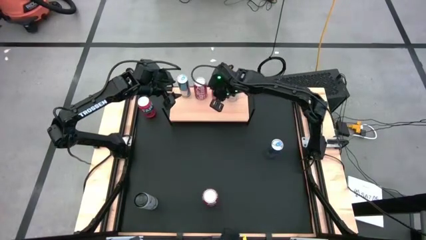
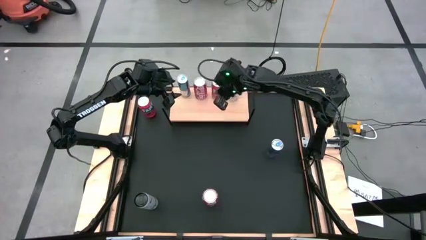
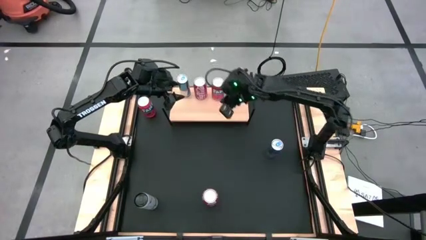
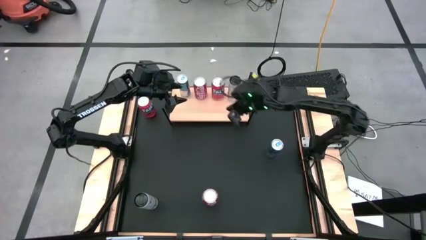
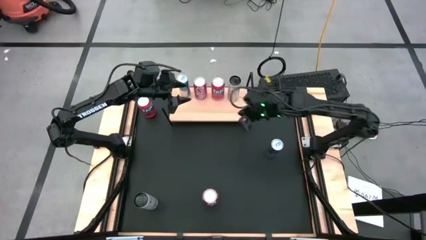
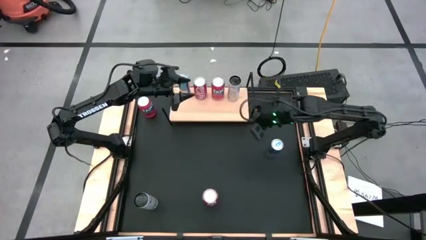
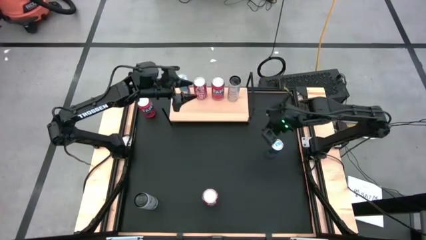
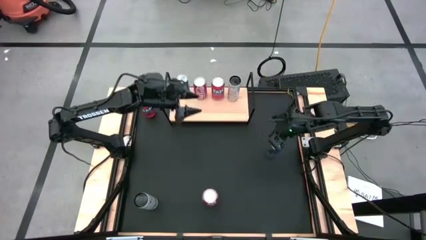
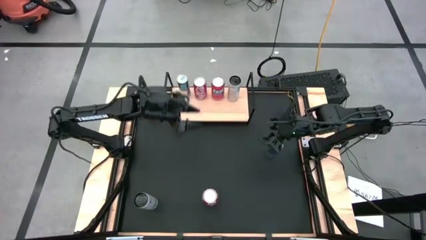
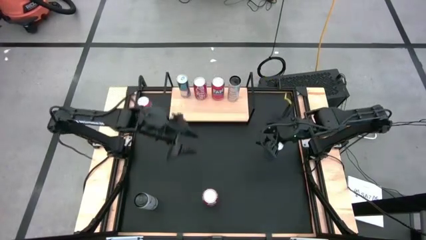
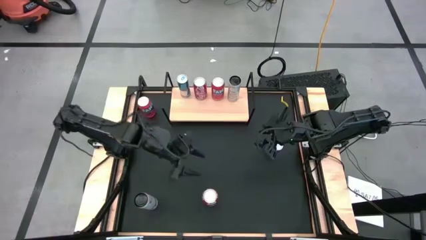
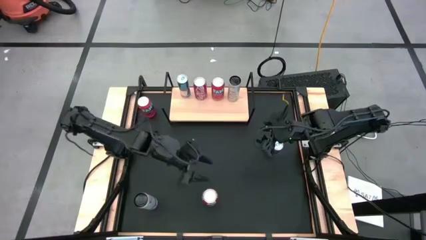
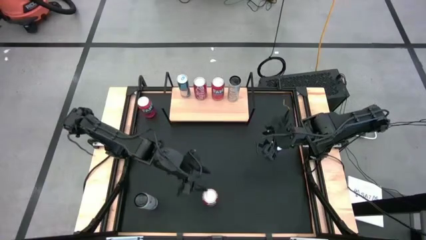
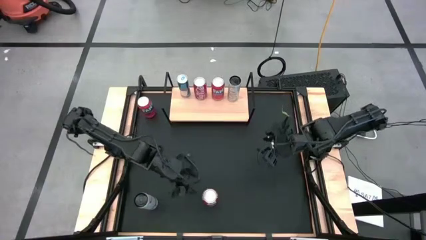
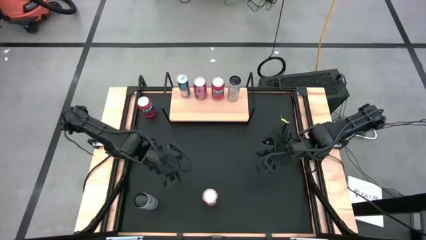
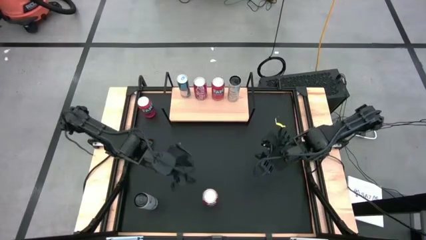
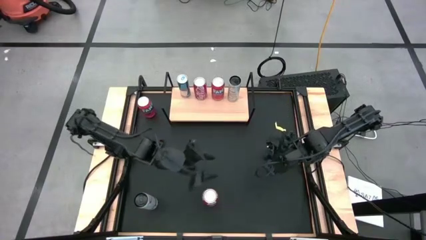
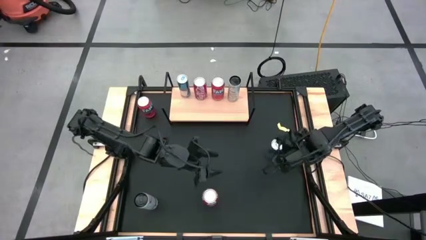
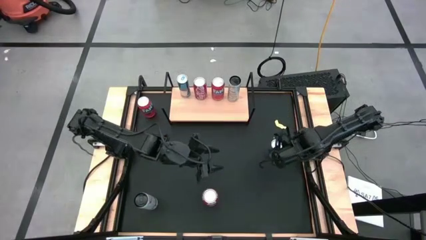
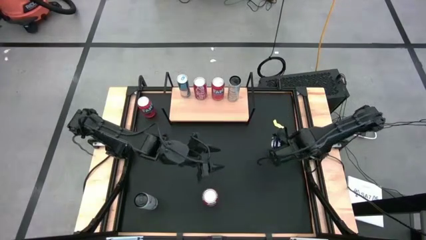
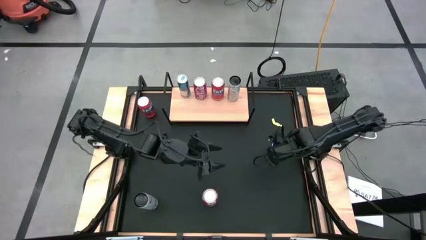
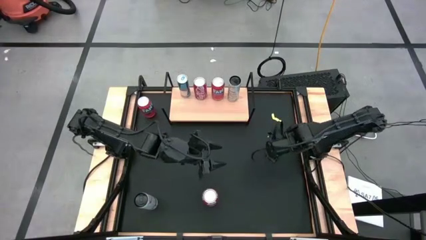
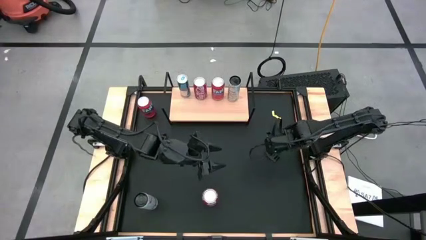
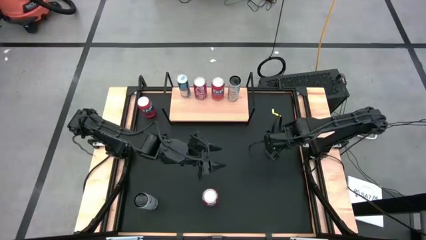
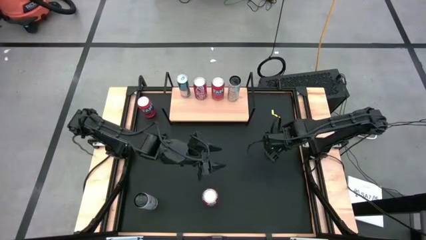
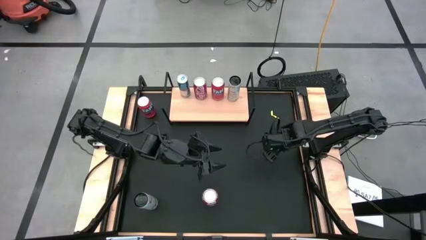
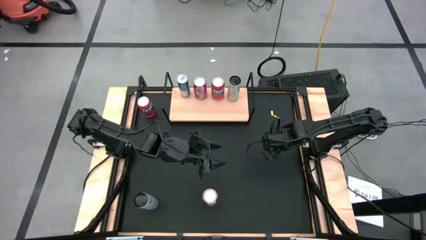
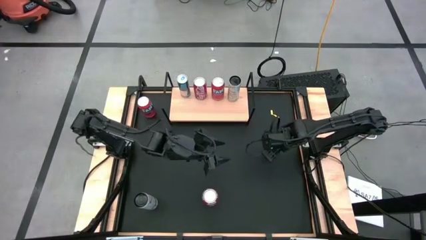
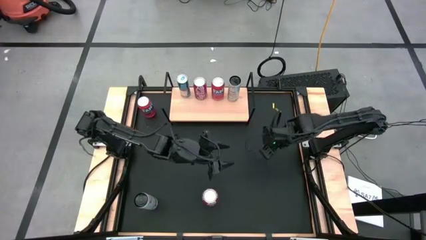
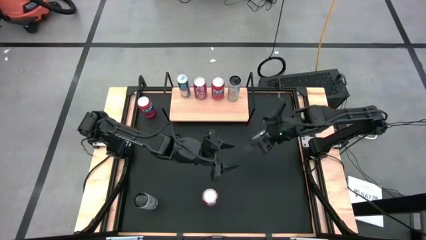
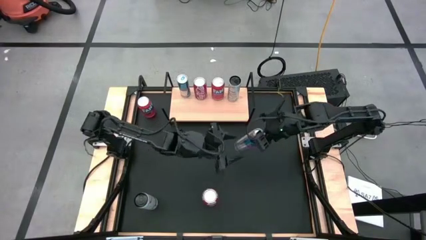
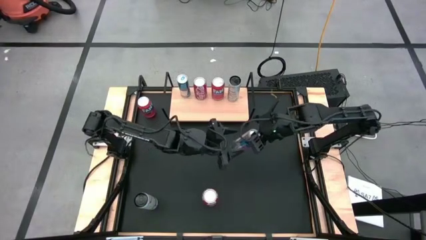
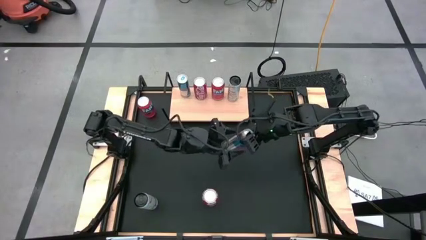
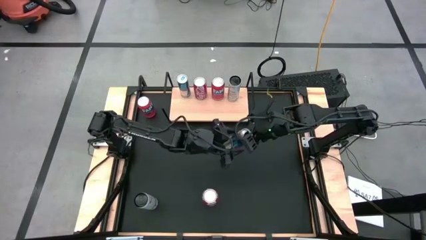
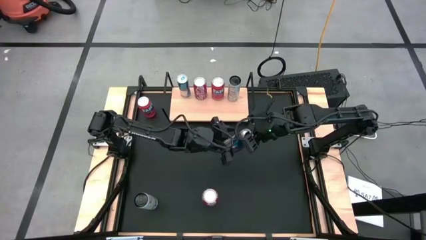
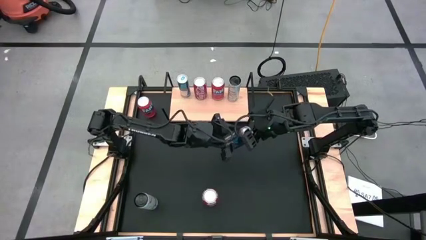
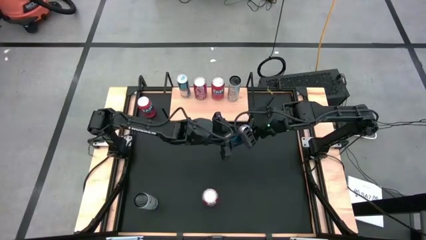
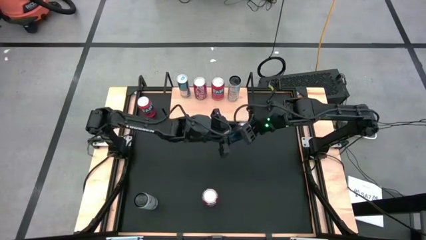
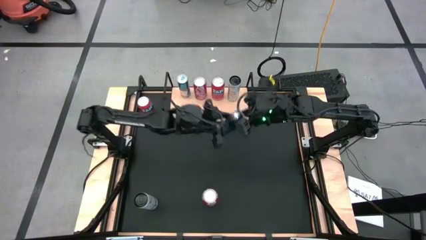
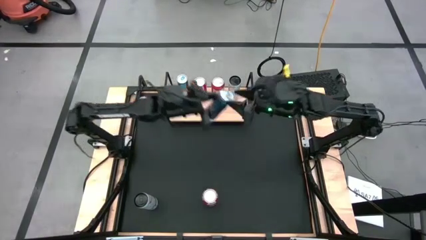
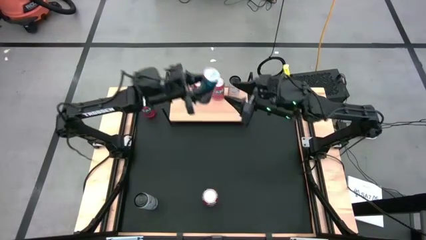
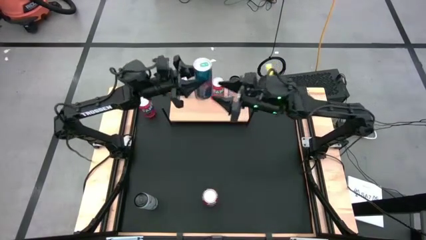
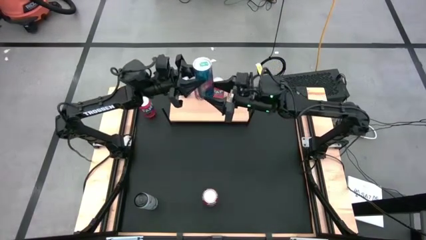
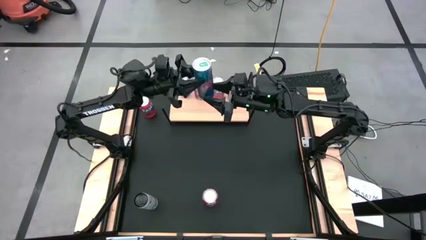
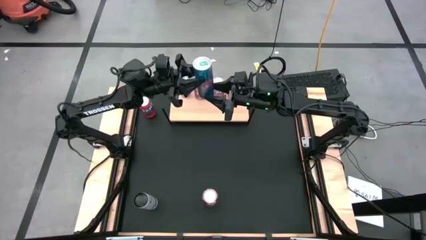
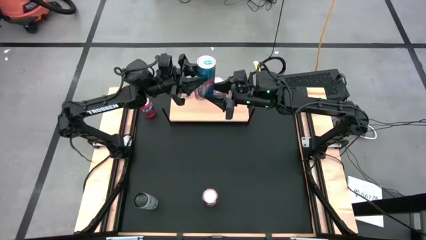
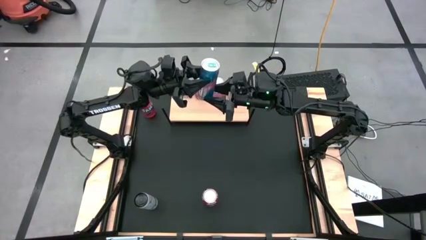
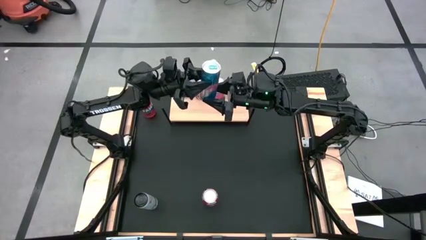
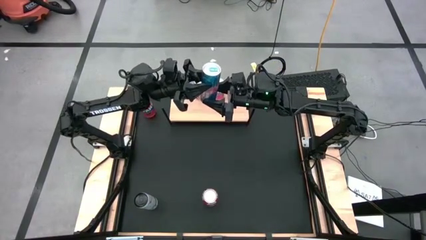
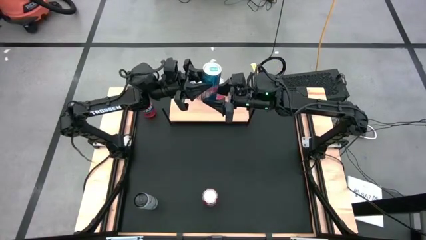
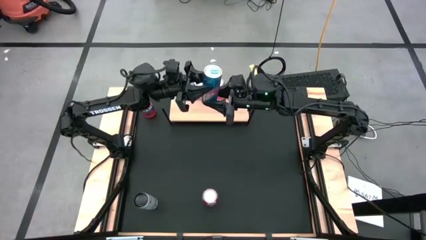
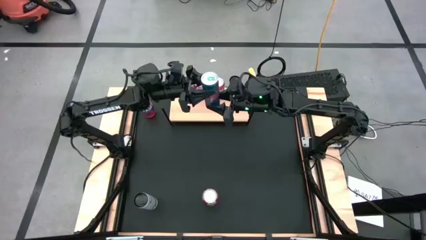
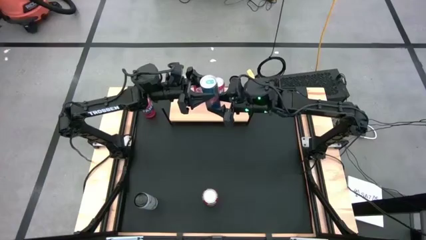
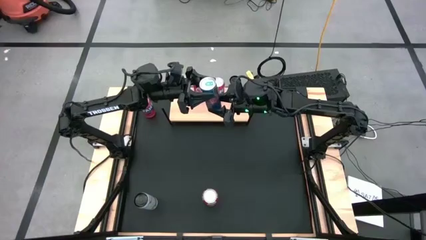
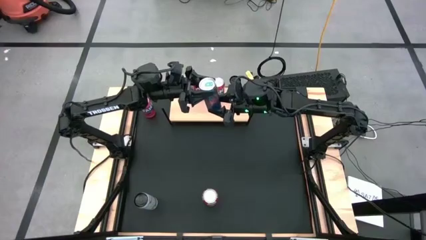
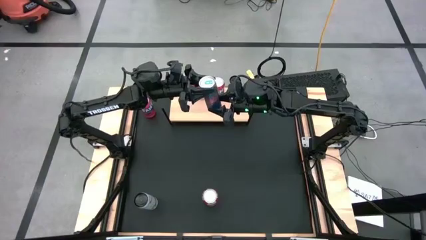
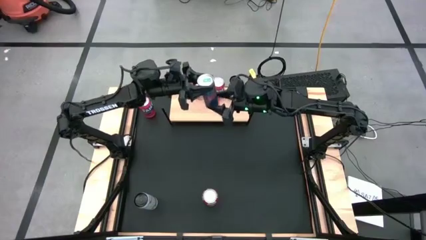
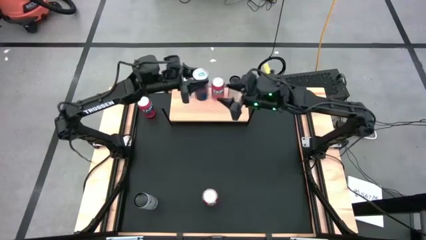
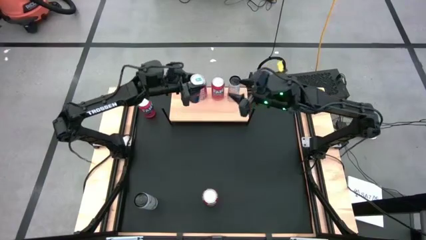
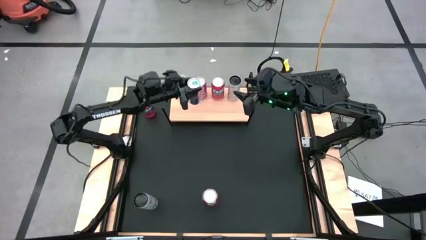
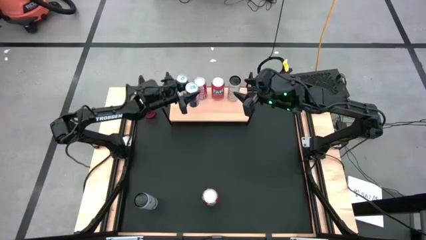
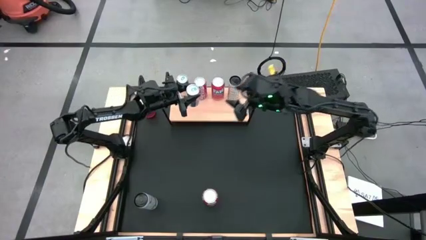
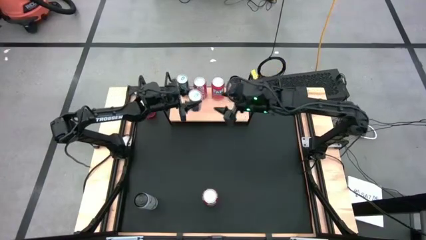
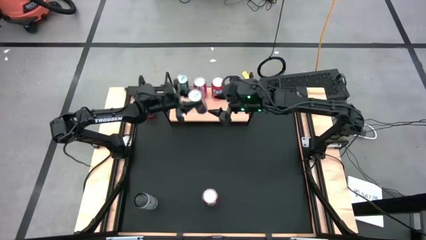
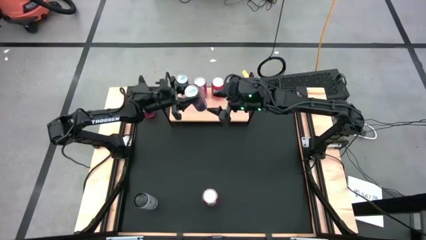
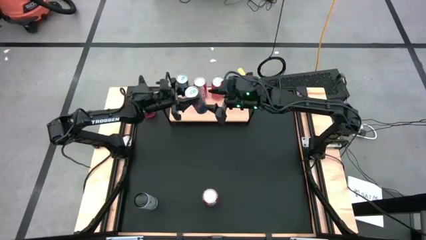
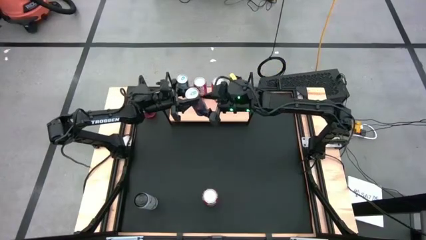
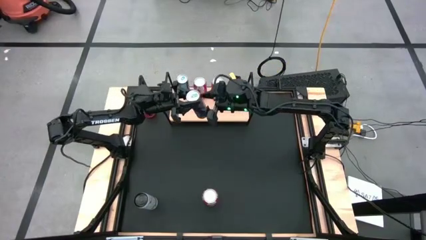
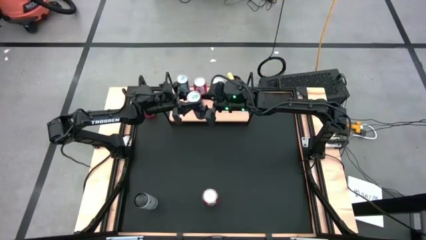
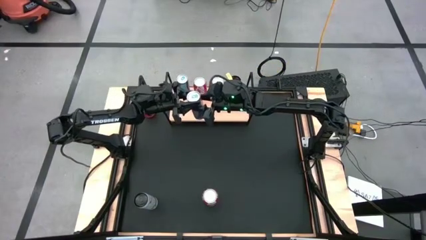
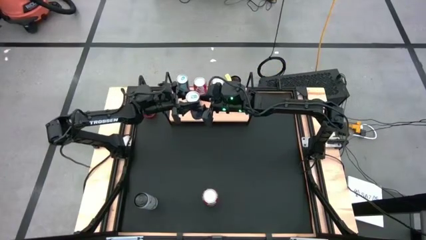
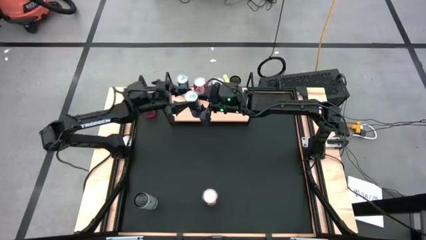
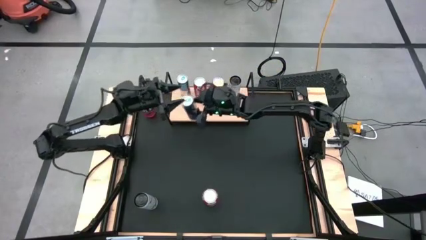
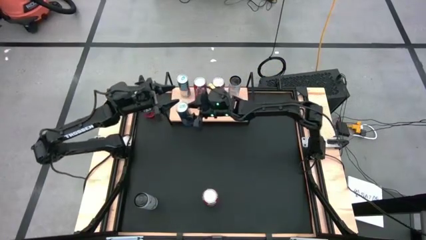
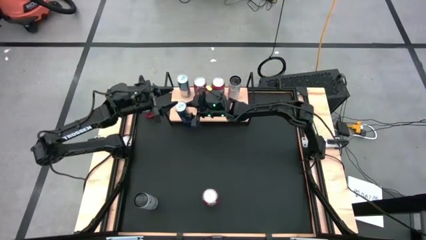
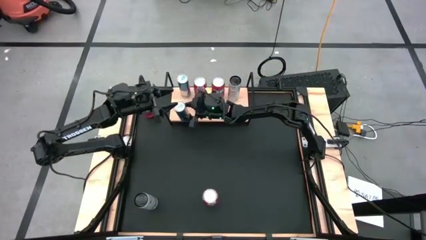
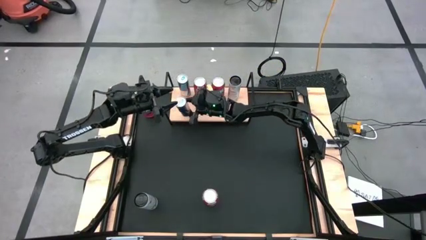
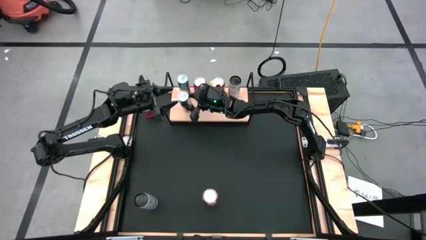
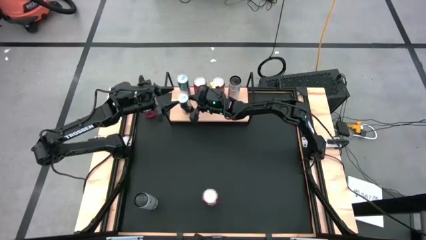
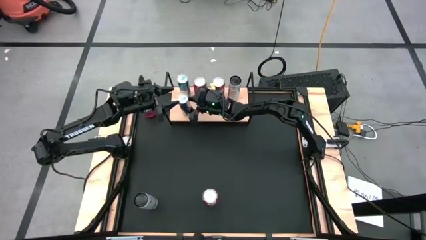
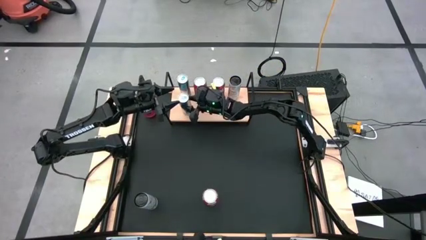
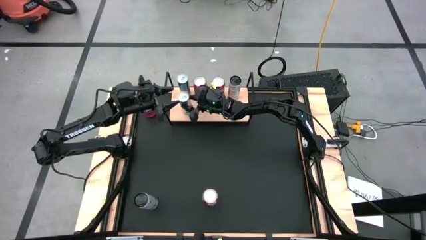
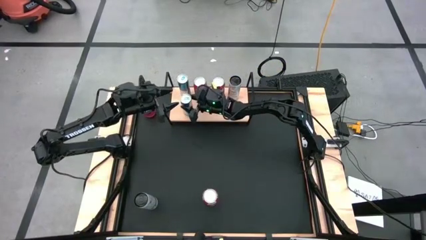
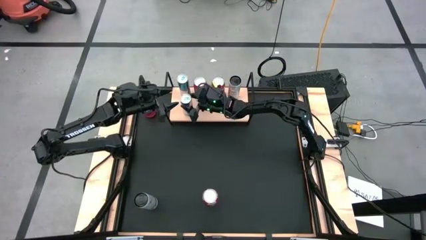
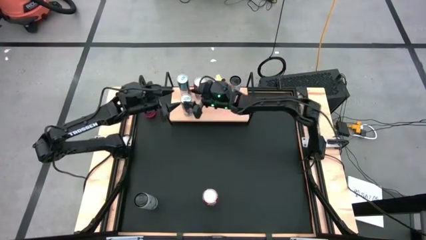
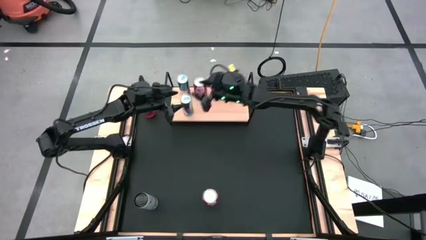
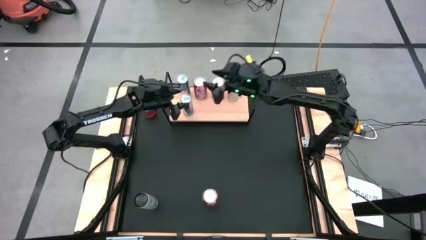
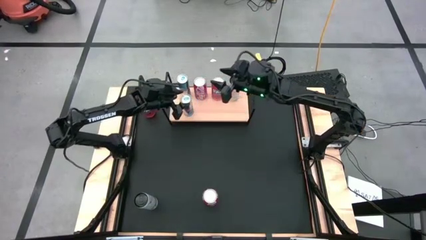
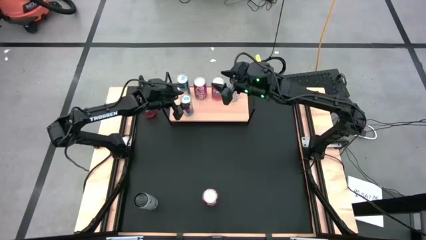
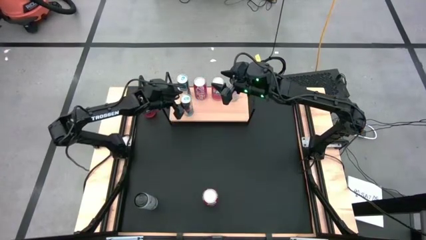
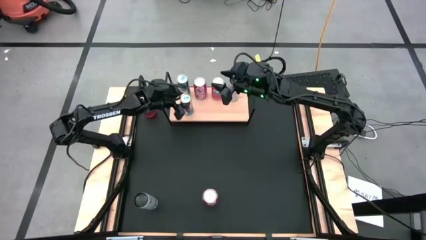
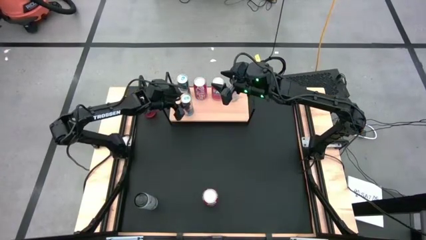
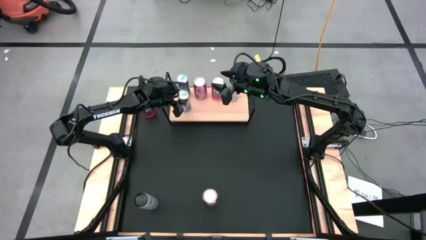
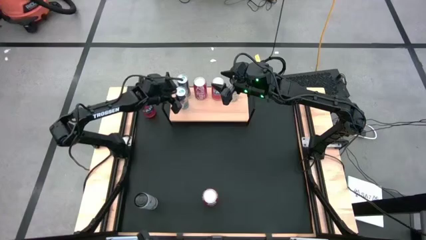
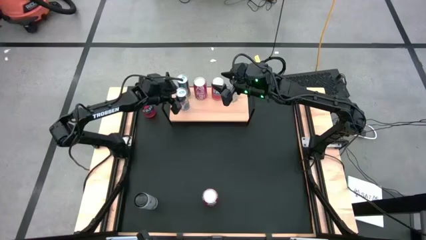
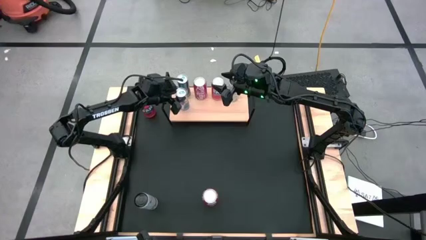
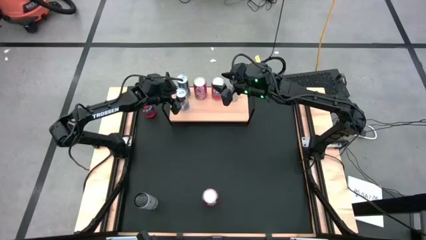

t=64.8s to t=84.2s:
Task: Place canned beverage on shelf
Put the blue soda can on the shelf aligned with the other blue soda can on the shelf
